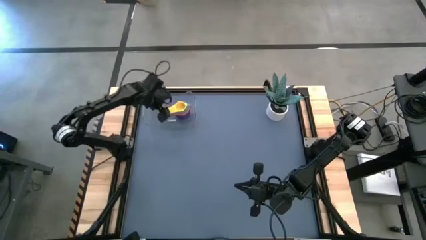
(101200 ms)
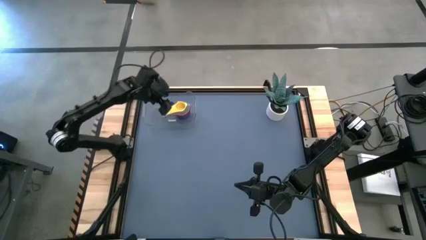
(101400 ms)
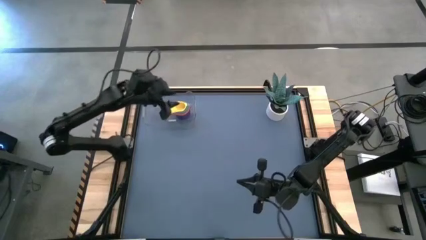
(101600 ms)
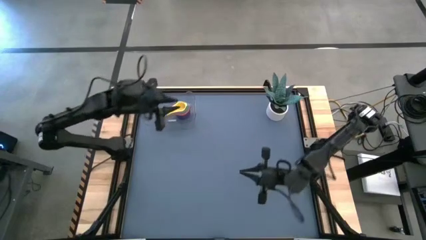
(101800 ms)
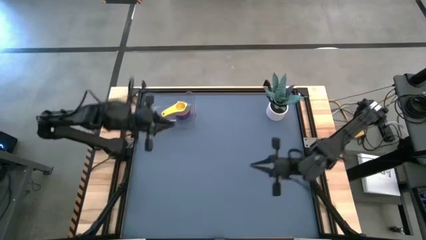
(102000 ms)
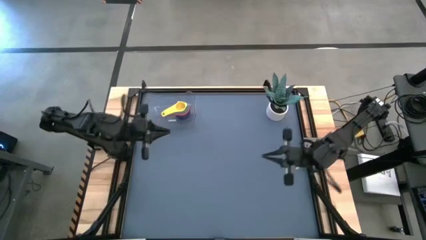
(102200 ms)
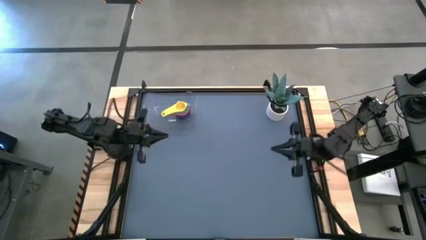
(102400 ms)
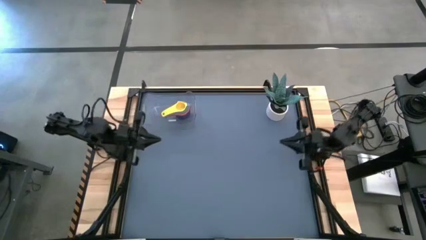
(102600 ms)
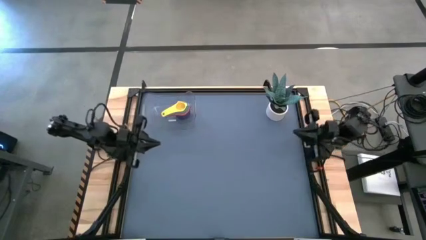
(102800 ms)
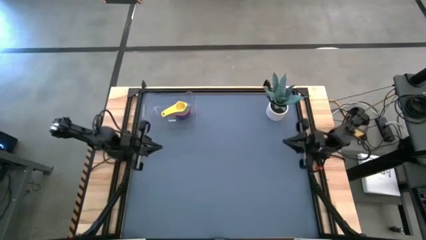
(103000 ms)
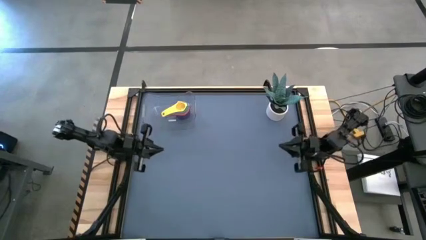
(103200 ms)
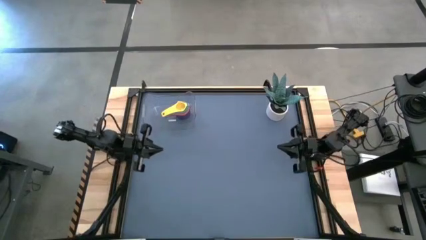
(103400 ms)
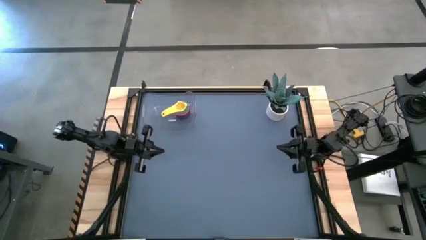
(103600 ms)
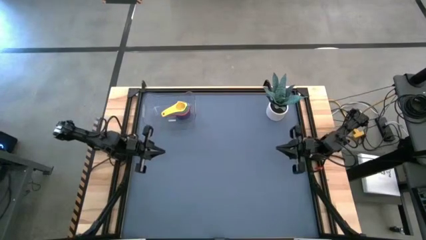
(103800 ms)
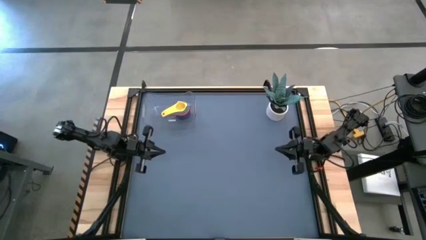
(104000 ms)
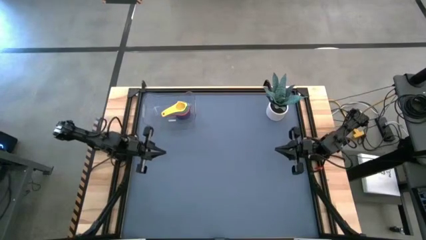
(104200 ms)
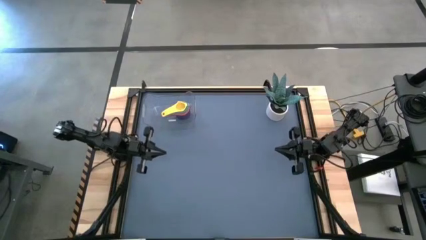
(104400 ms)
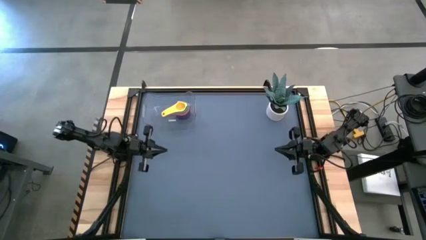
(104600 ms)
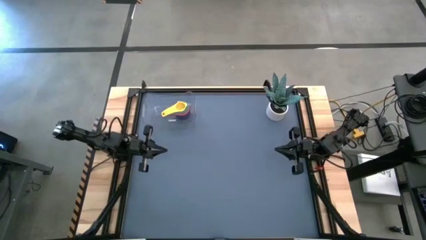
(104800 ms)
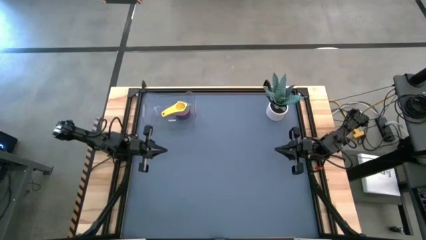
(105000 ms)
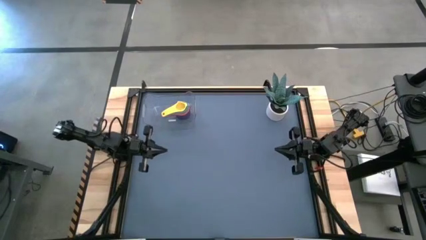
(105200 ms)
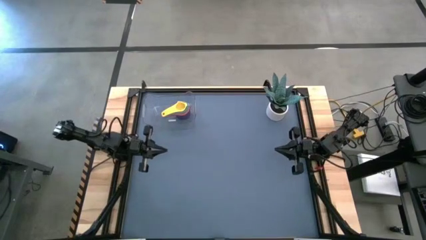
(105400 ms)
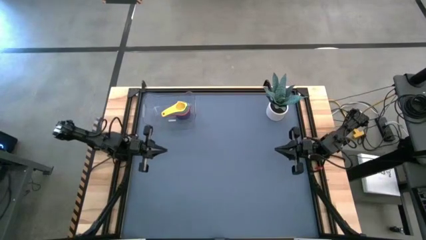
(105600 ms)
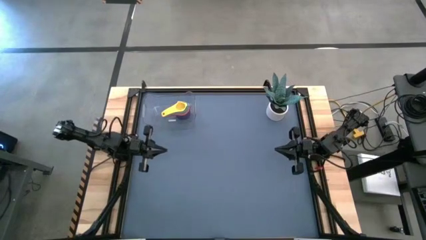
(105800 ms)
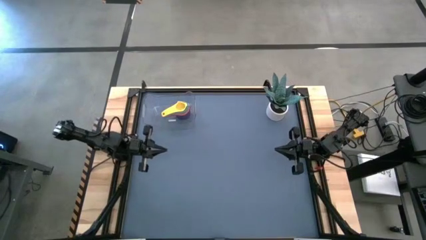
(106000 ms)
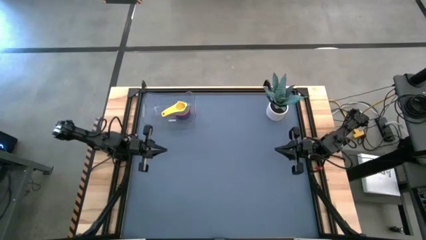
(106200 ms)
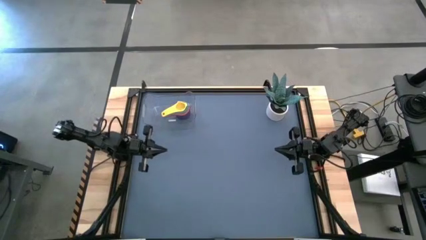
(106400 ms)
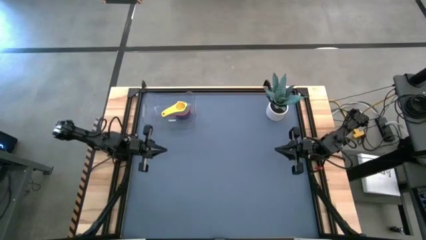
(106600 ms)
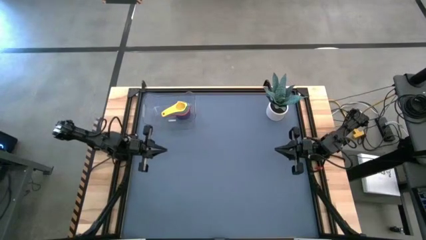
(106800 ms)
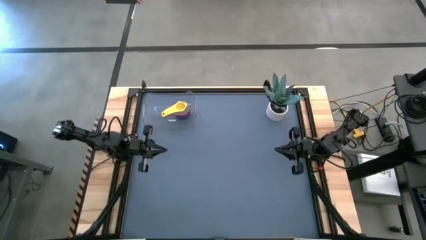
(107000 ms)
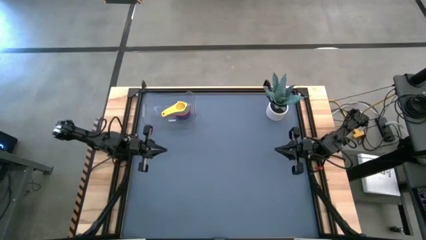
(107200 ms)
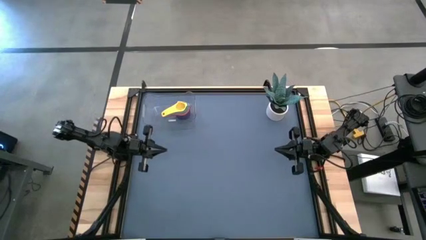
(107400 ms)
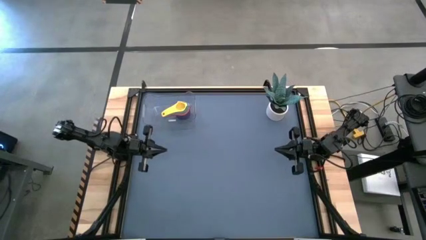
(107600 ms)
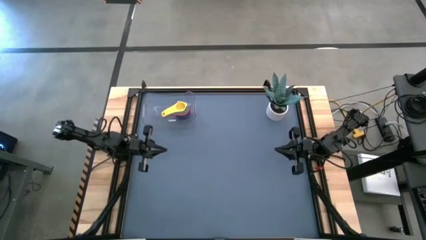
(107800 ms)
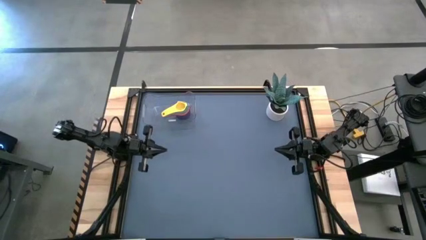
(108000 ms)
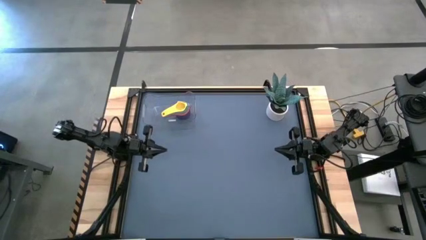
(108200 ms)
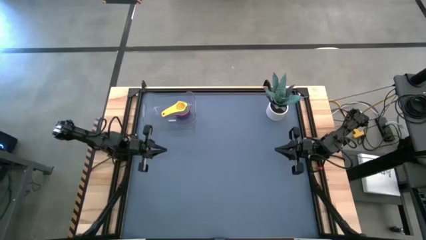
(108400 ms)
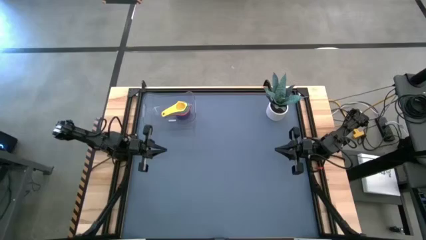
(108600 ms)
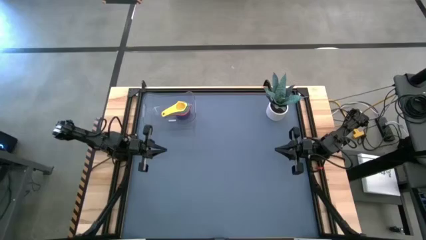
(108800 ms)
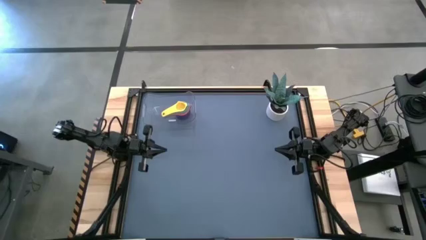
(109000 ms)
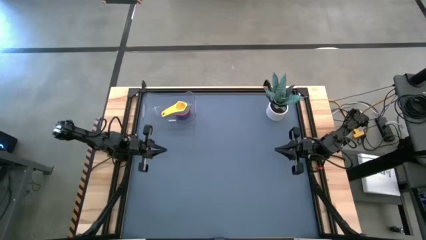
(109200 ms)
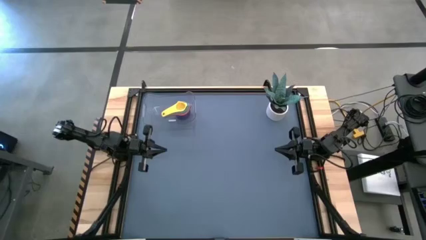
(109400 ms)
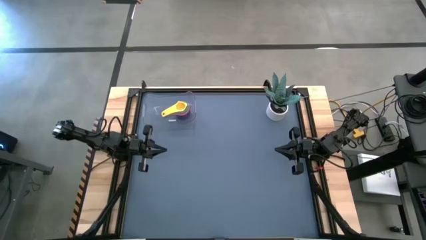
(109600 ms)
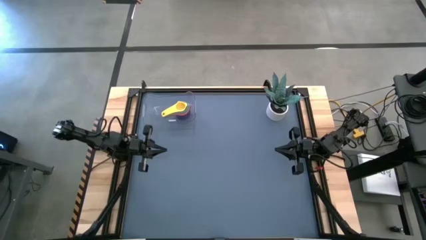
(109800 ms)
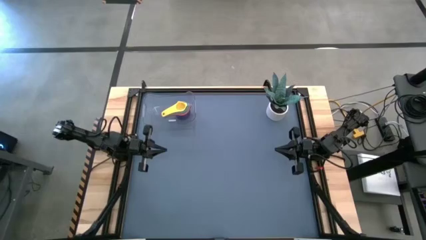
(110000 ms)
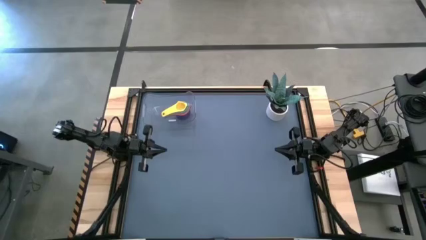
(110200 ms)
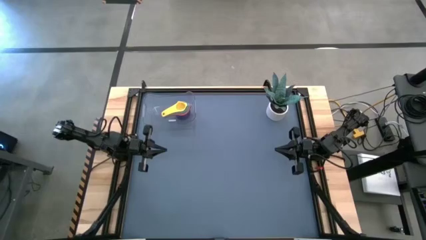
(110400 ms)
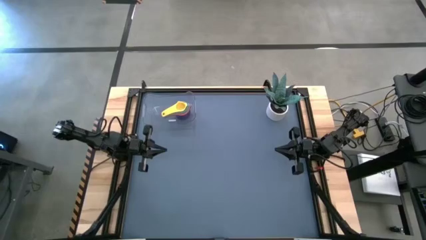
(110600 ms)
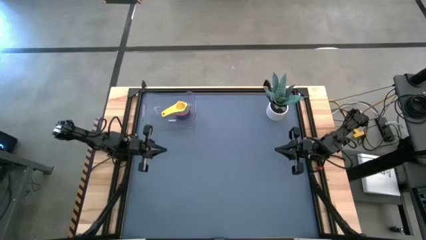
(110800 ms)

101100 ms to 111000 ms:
Task: Nest measuring cups in basket
Return to home position

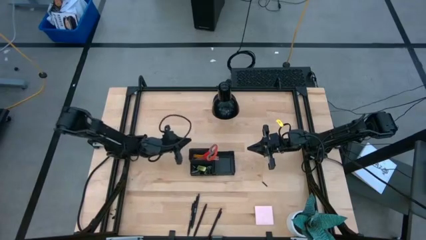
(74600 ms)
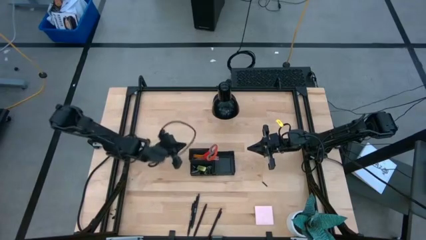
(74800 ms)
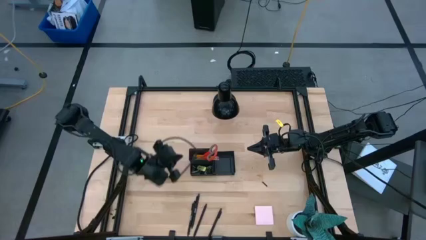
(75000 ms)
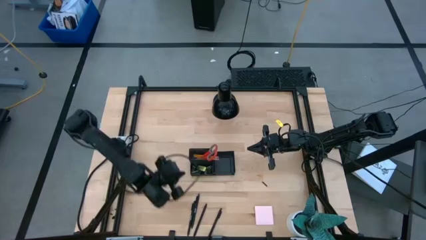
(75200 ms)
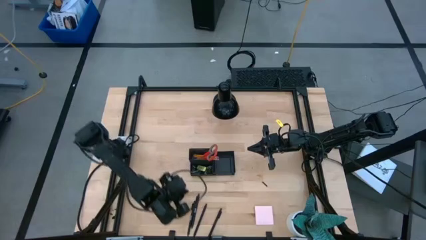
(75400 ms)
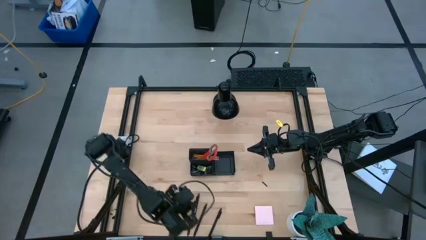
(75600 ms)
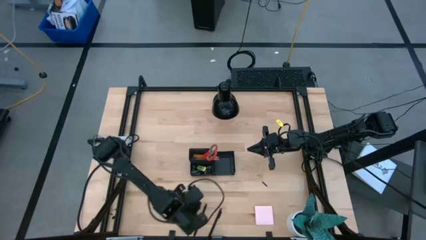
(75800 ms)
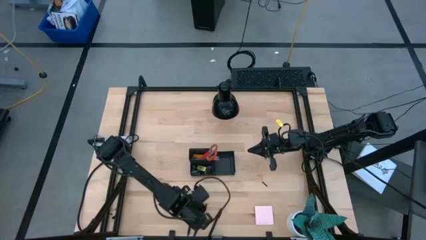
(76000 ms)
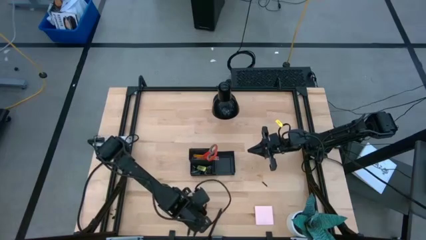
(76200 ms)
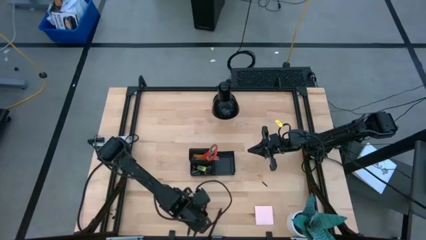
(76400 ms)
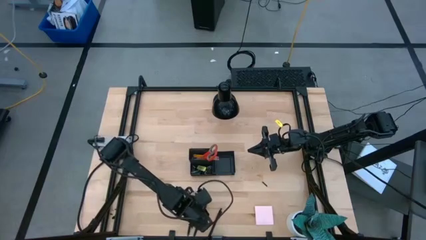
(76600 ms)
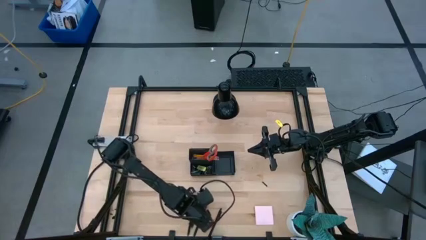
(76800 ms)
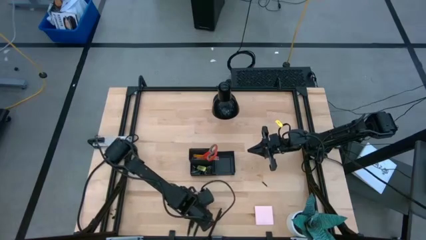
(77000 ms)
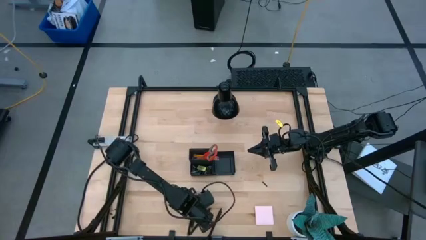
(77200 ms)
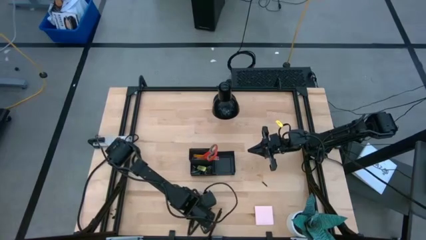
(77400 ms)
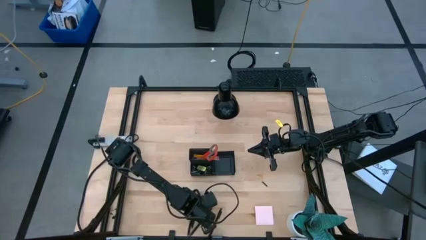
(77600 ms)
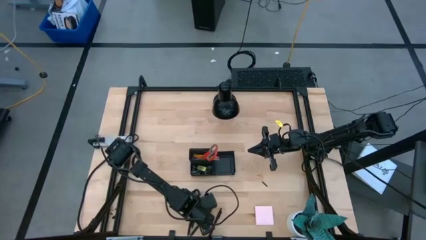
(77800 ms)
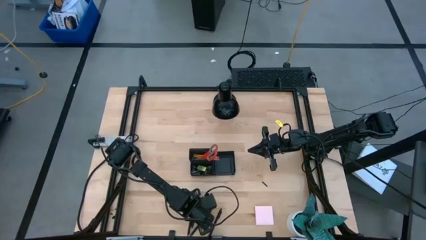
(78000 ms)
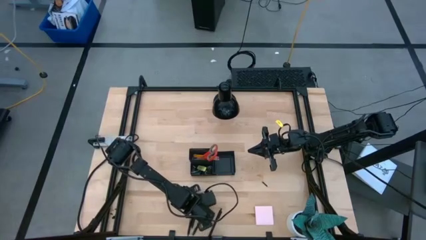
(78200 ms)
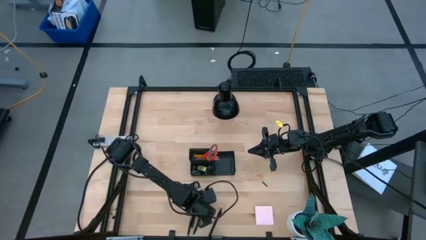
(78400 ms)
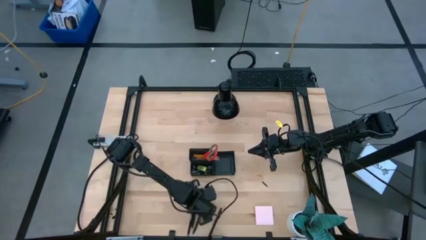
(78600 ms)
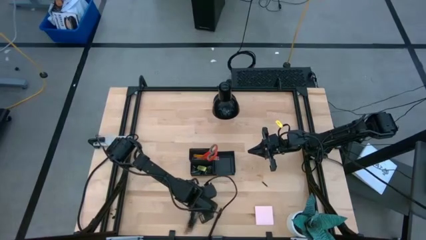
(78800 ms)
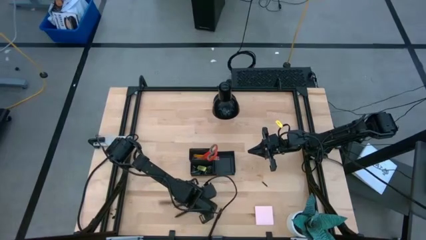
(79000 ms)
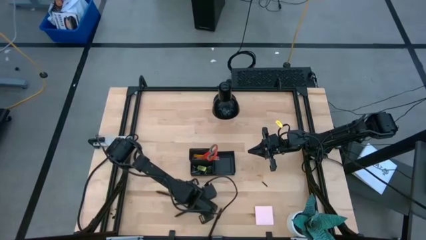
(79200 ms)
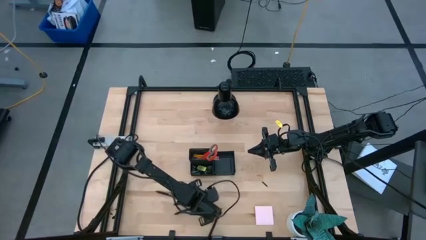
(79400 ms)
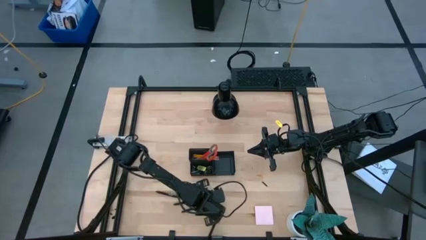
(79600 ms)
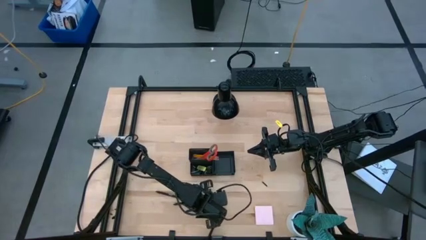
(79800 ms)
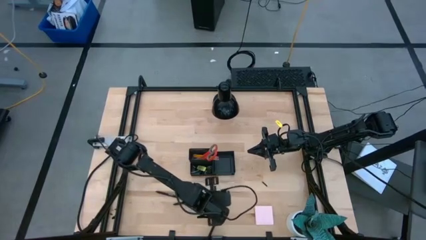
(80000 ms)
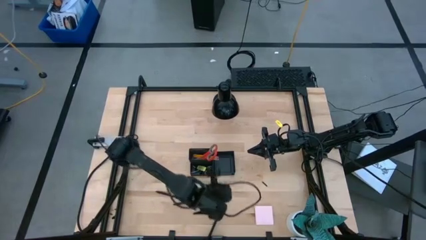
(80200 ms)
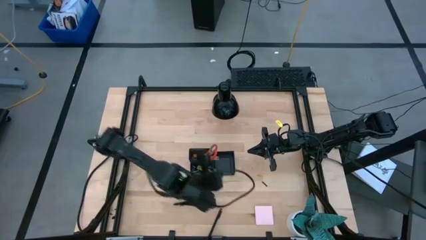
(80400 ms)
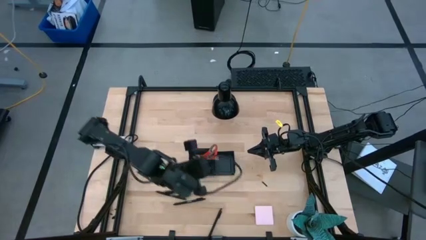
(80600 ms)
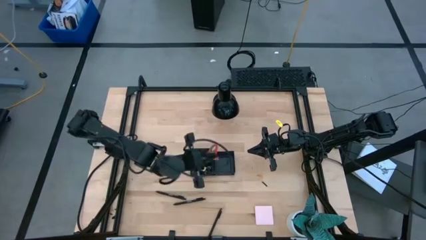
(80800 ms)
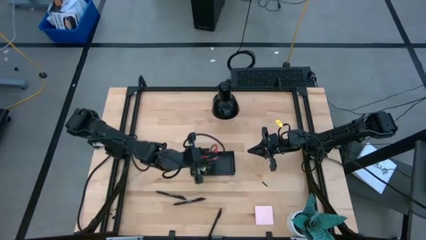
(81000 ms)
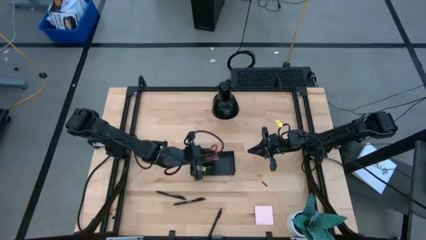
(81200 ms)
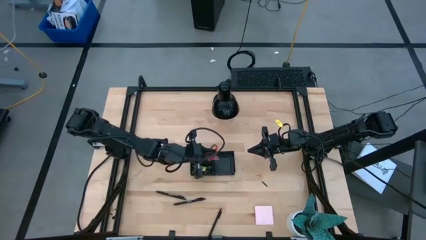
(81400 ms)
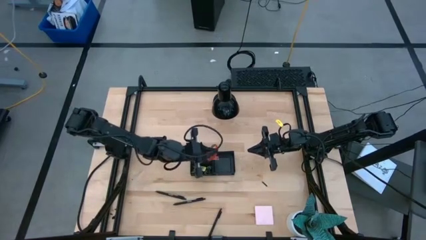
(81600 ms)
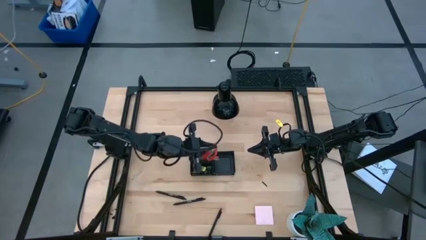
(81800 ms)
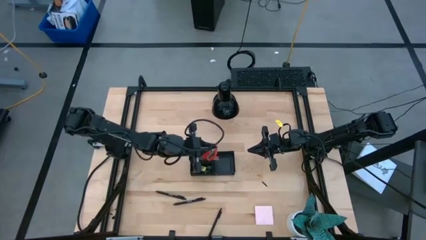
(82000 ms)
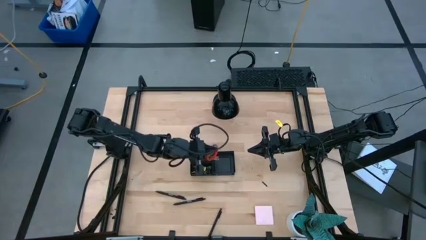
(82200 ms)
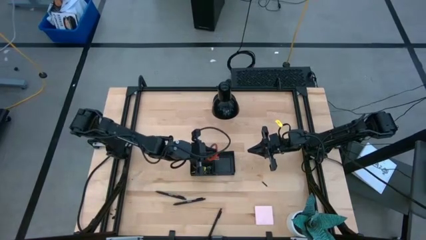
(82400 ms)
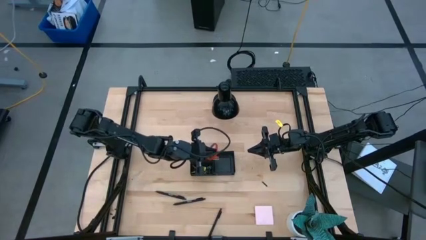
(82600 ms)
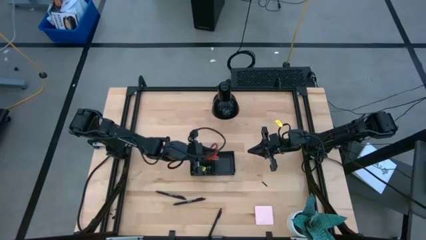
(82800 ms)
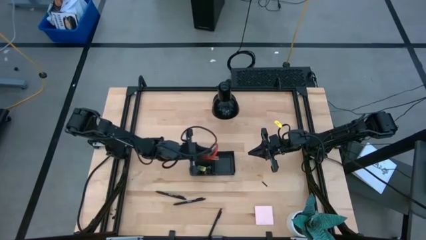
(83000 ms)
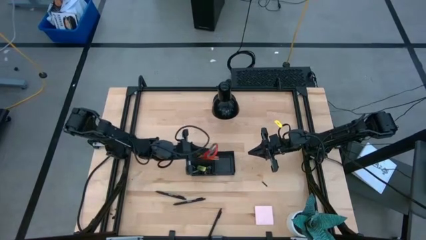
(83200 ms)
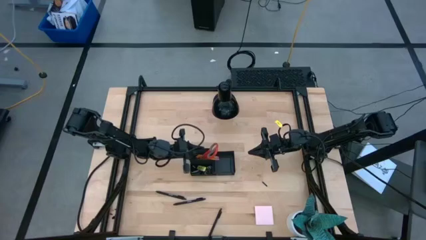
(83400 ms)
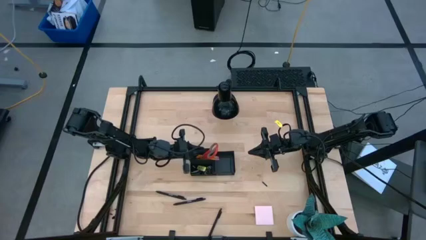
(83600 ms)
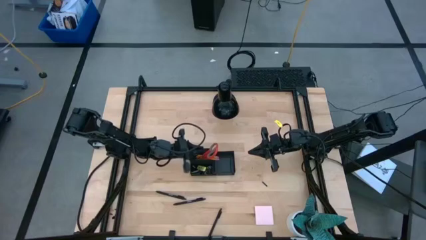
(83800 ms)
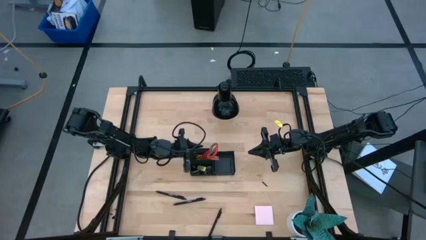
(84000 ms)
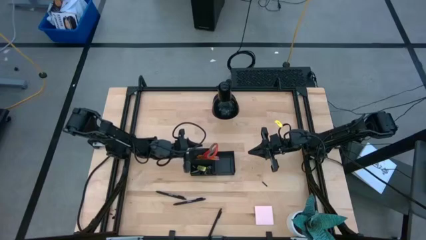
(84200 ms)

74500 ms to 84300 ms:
Task: Pick and place office supplies into organizer
Put the pen into the top left section of the desk organizer
